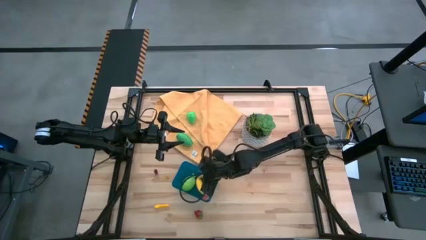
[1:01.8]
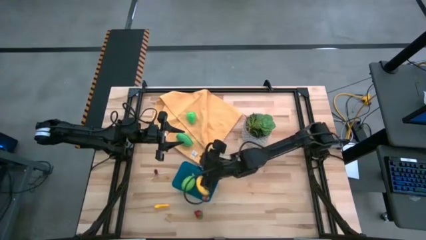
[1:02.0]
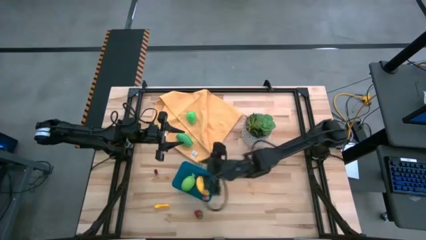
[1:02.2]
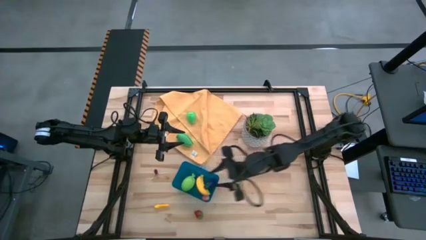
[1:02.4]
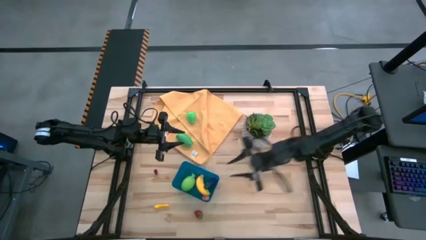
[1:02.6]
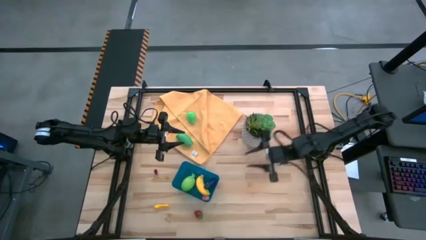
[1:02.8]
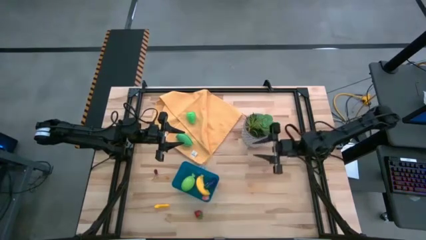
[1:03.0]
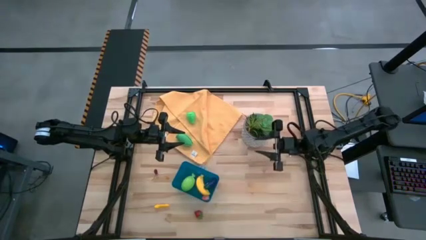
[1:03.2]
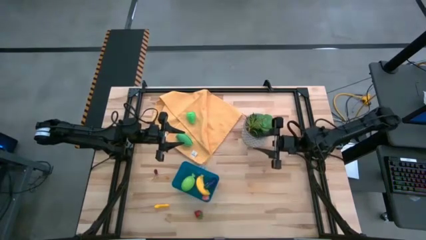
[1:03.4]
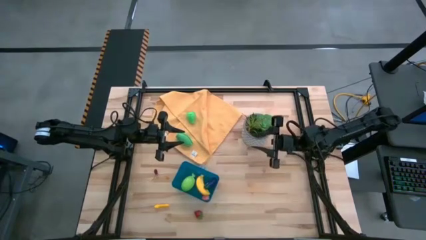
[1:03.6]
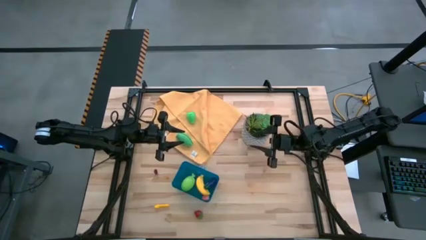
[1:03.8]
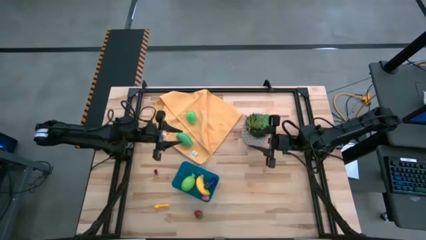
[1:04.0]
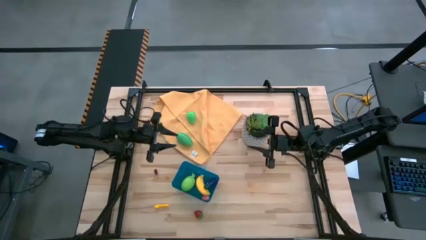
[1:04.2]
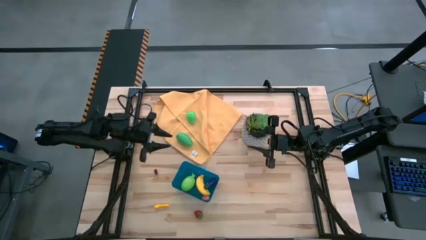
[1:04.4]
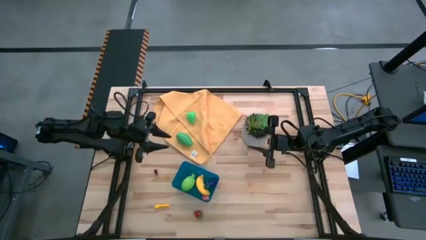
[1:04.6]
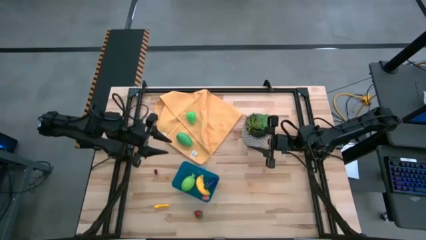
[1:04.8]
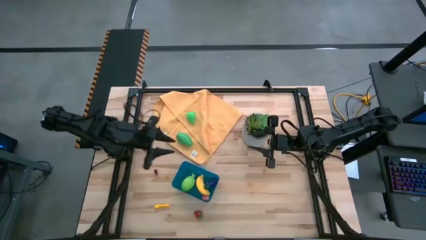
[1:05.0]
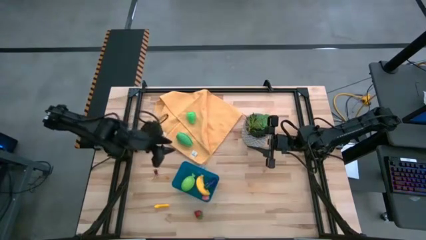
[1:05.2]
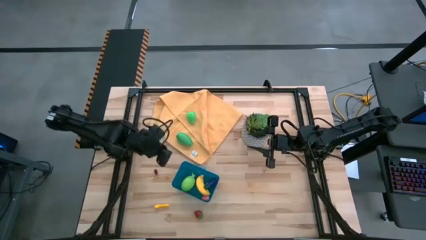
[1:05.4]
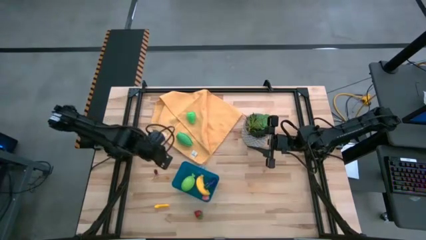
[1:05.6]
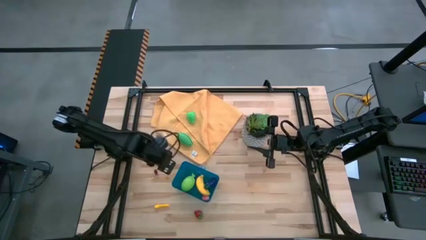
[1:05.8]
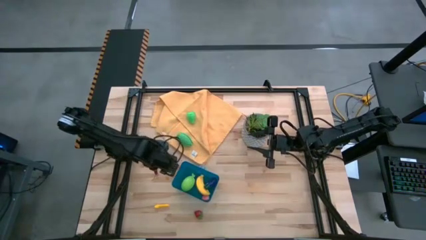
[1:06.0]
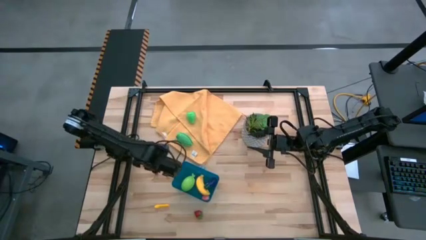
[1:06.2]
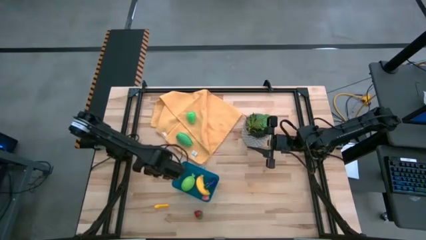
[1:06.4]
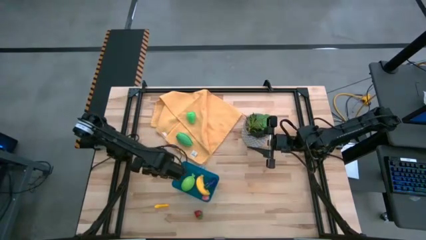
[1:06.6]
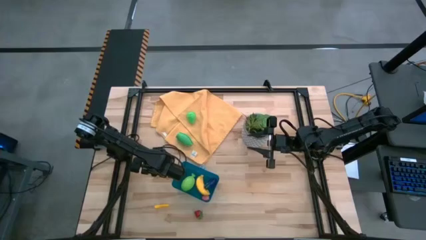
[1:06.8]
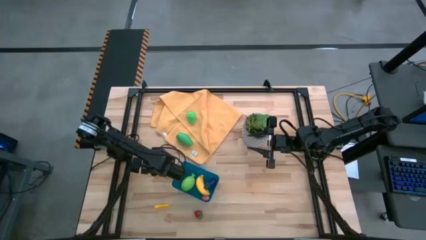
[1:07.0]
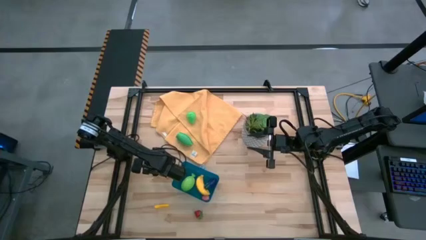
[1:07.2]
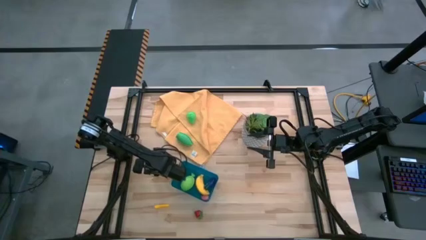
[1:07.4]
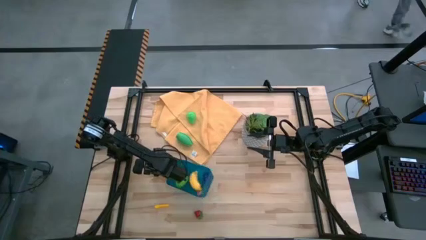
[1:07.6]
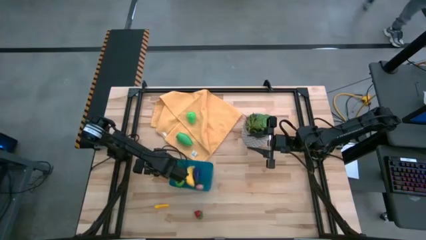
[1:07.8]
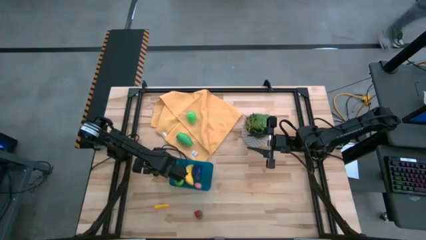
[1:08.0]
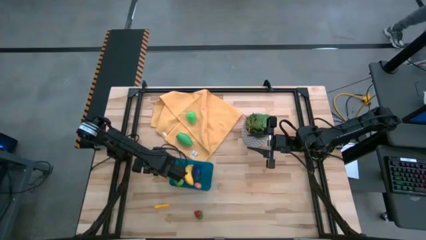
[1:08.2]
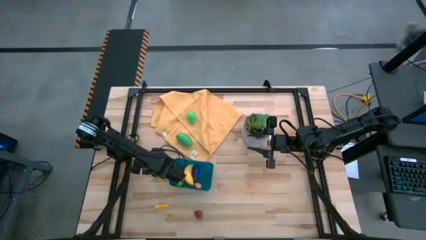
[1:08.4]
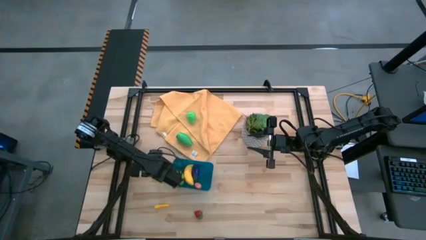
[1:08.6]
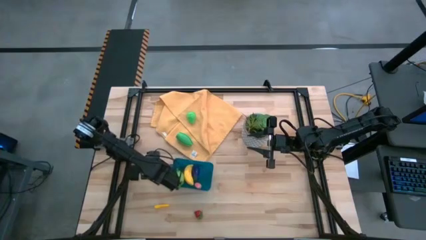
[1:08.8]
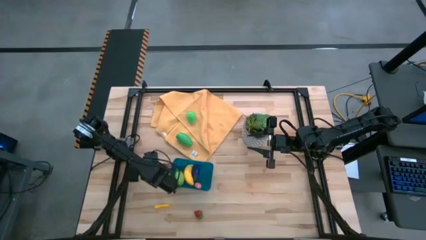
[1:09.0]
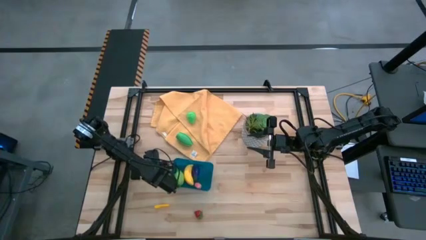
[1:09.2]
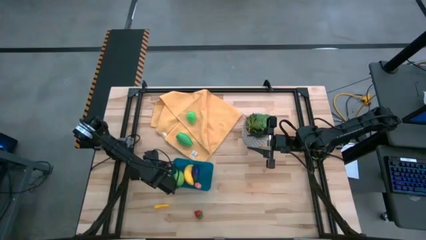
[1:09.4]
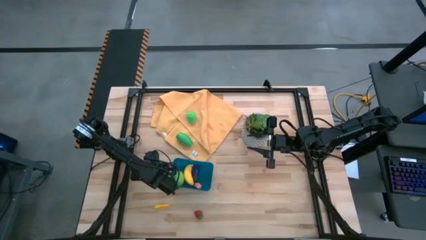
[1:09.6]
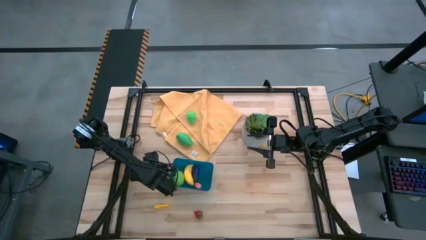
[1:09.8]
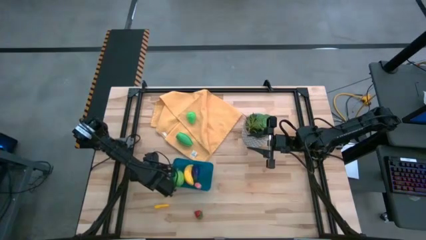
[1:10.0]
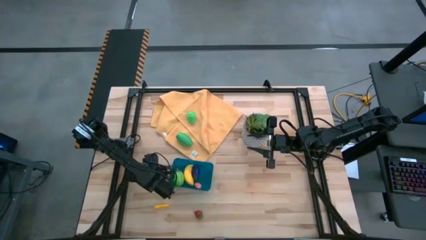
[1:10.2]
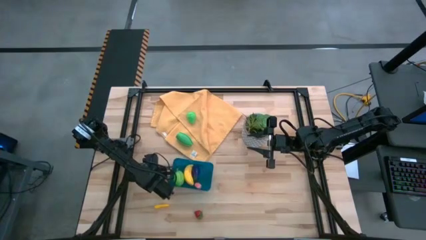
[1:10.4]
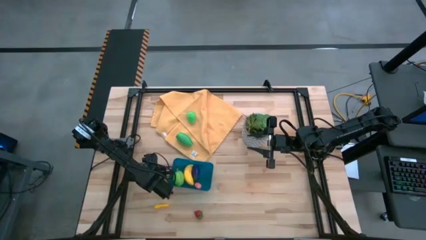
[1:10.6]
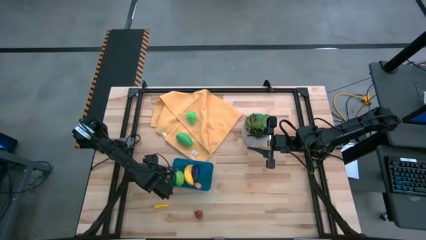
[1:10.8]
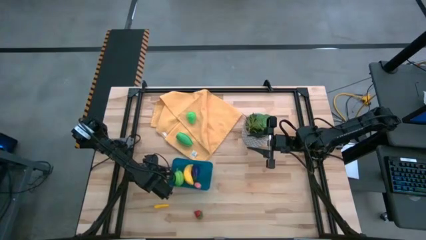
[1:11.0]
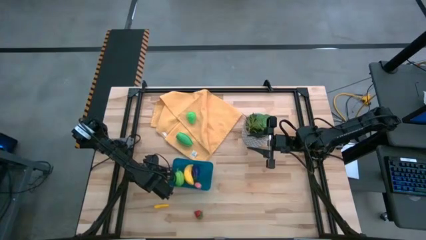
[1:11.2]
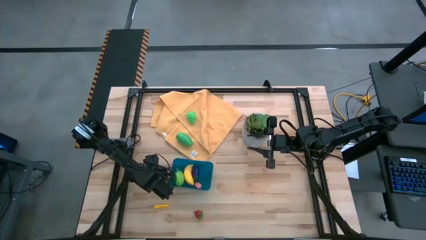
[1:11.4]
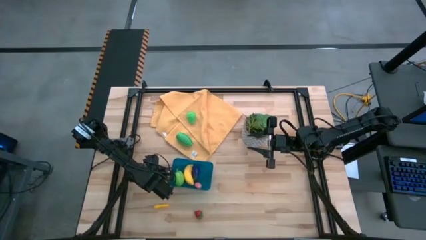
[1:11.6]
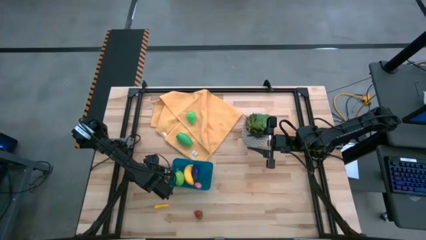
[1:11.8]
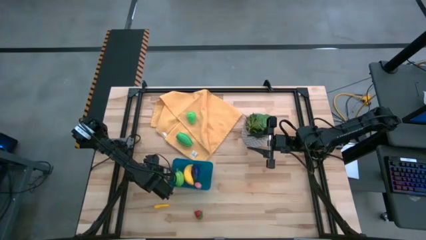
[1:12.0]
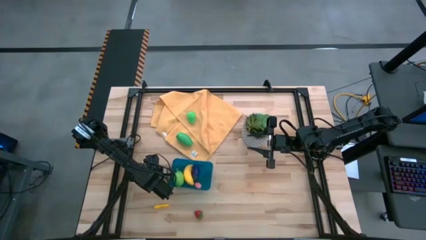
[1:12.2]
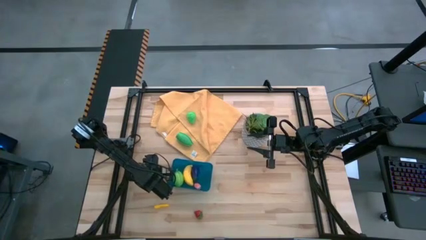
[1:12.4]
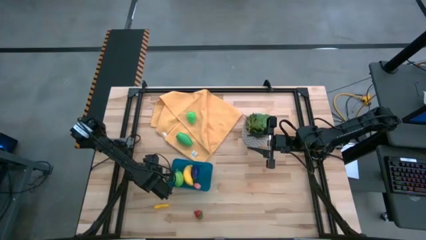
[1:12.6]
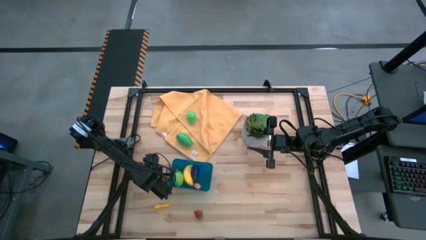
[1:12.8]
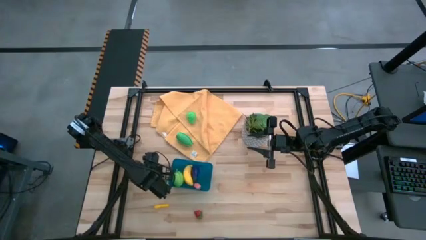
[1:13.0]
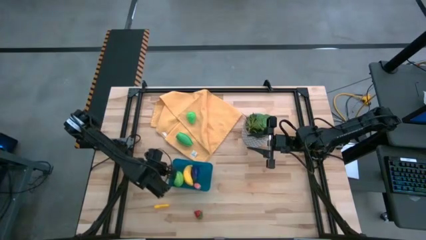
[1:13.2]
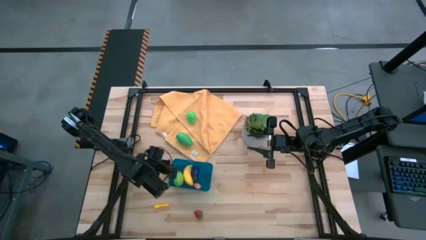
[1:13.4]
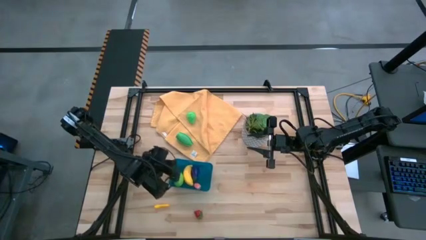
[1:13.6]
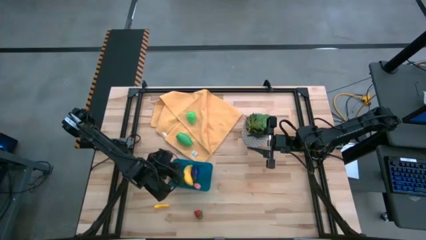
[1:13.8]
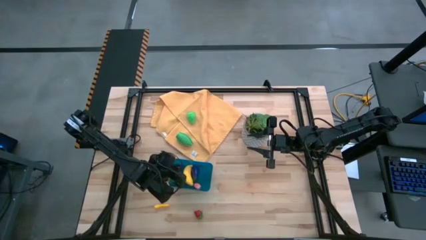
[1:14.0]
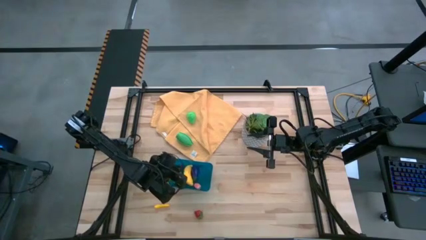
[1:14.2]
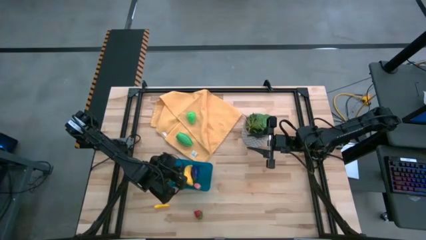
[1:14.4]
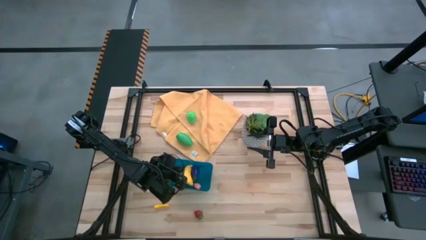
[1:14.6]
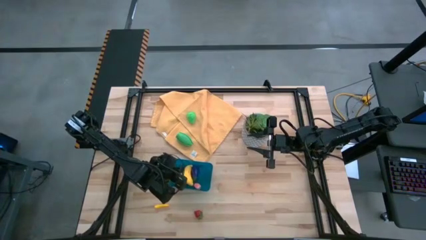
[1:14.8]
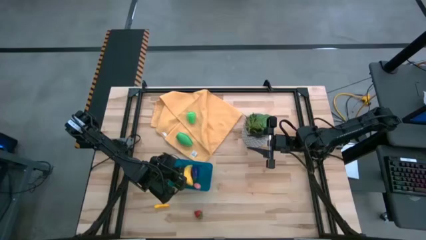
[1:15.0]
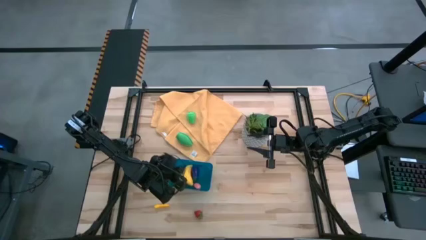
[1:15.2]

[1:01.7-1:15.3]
Task: Pick and placing Produce into tupperware
Put the cherry into the blue bin

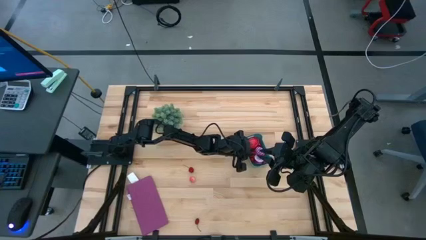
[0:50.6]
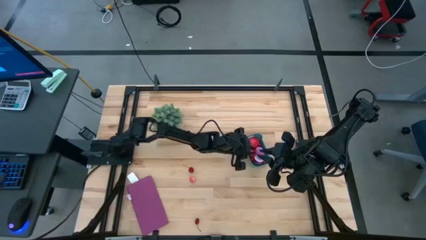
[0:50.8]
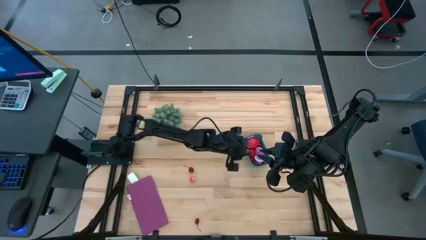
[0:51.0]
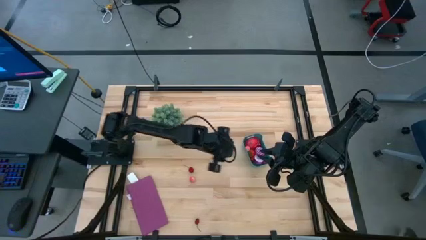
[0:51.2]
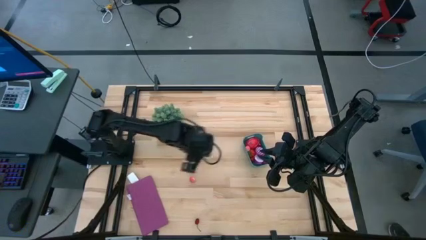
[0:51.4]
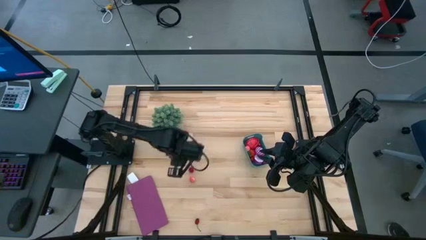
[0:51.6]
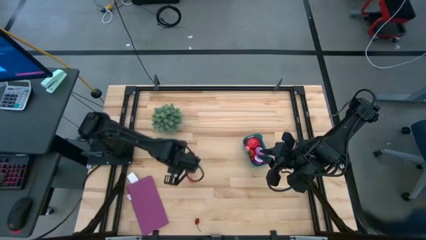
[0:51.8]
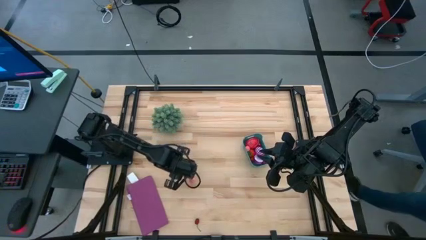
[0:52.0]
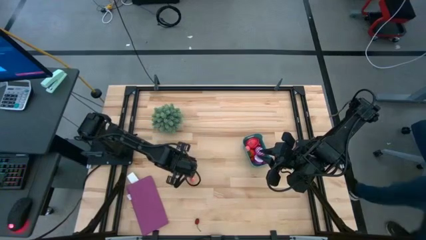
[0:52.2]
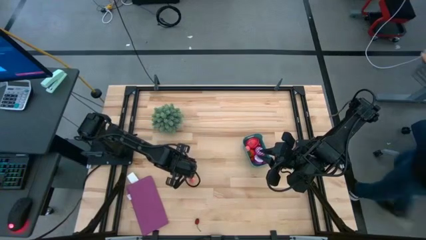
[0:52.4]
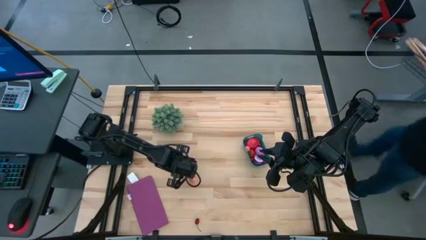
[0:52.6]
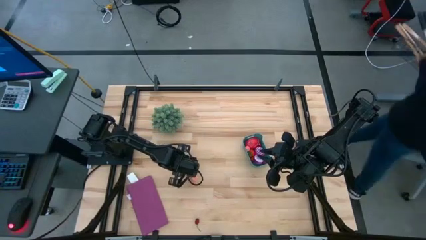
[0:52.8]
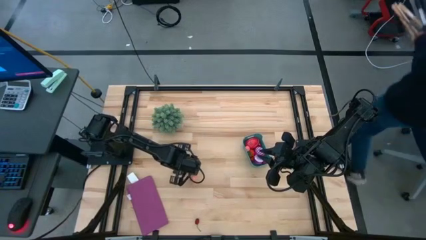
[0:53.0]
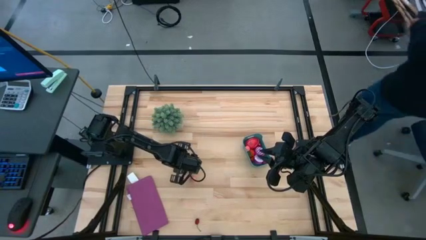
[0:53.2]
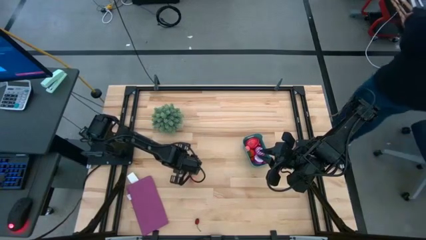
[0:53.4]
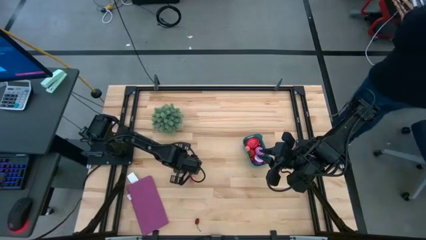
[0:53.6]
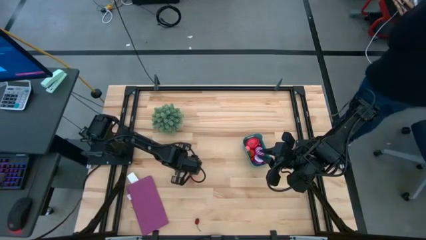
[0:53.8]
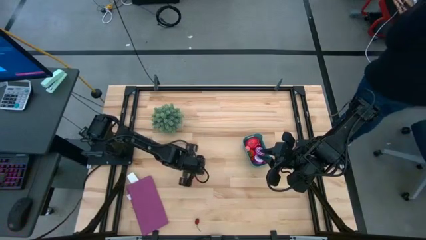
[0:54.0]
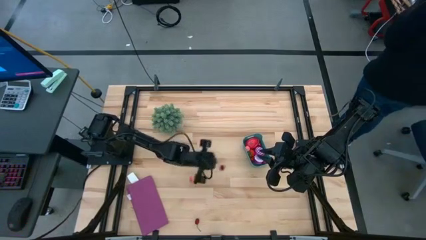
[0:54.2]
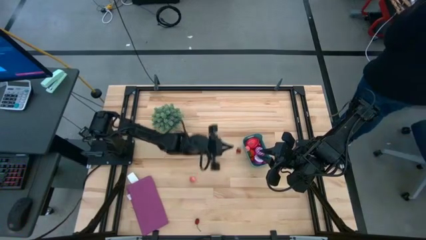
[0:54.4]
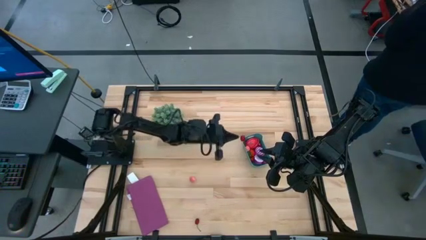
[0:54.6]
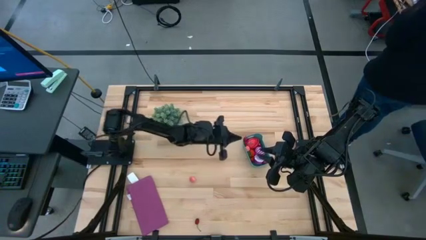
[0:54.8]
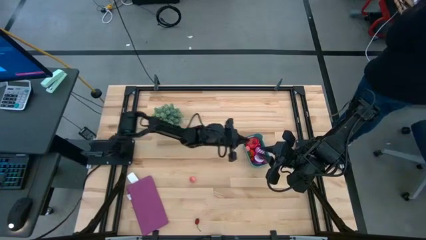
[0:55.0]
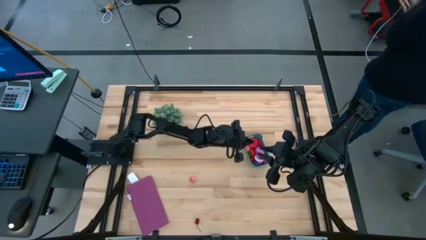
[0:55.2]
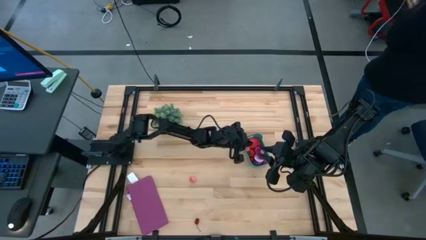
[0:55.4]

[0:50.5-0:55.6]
Task: Pick and placing Produce into tupperware
Put the cherry in the basket
